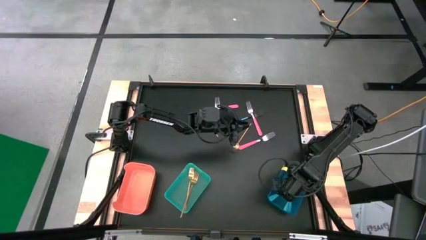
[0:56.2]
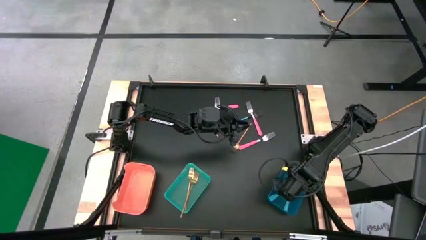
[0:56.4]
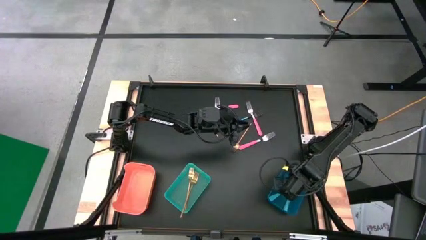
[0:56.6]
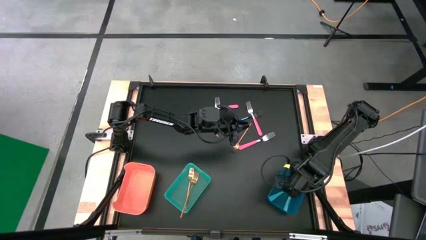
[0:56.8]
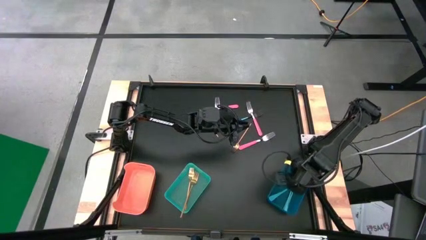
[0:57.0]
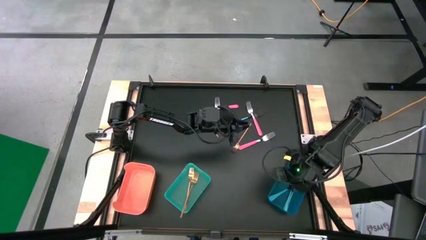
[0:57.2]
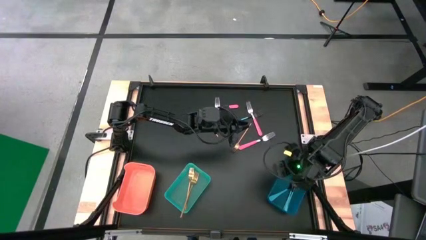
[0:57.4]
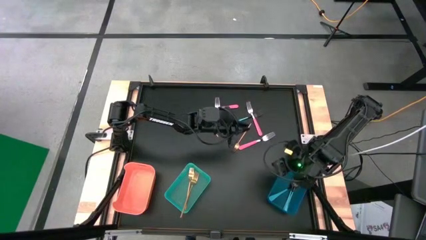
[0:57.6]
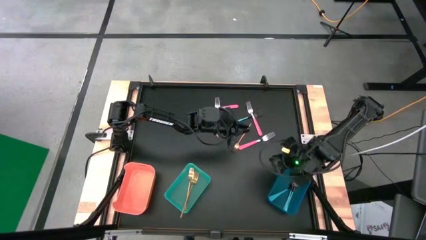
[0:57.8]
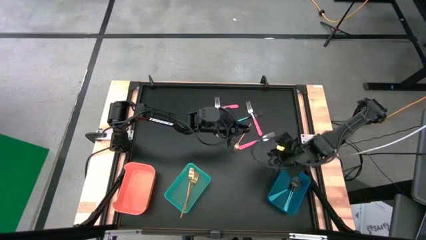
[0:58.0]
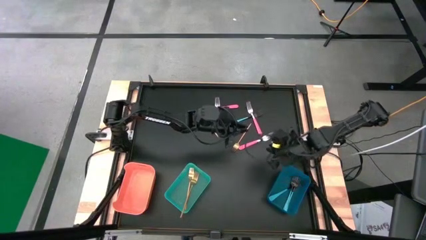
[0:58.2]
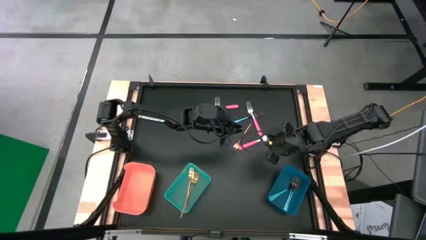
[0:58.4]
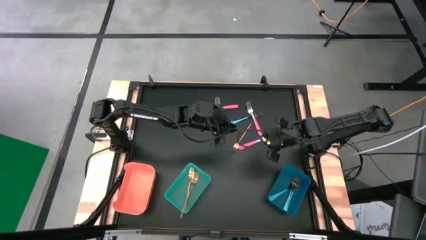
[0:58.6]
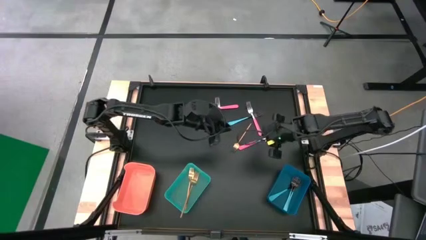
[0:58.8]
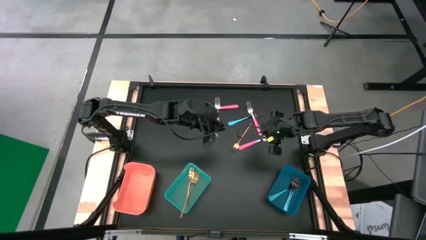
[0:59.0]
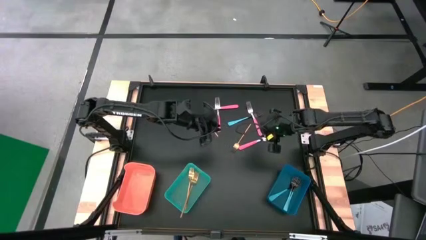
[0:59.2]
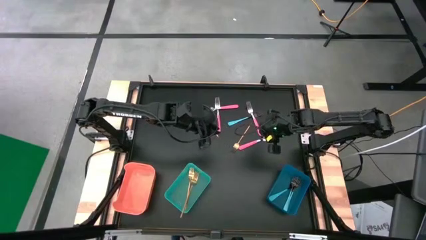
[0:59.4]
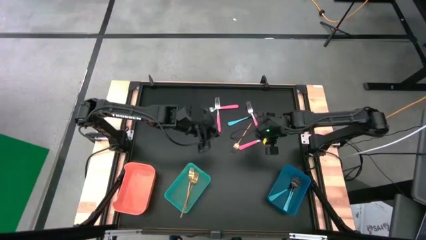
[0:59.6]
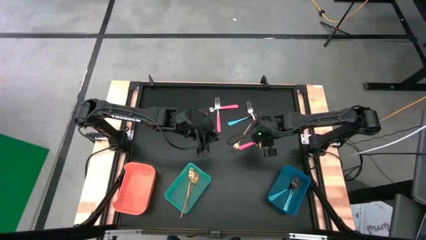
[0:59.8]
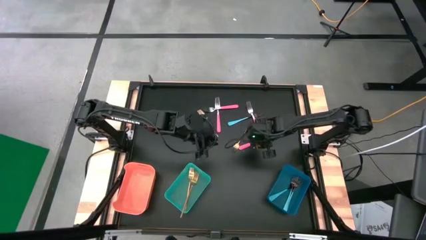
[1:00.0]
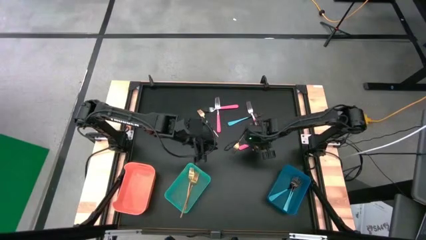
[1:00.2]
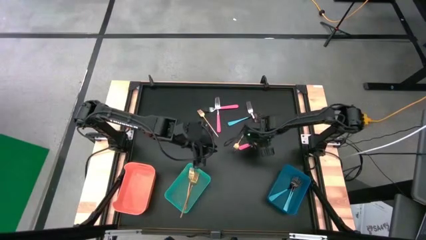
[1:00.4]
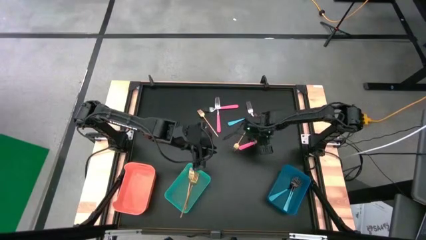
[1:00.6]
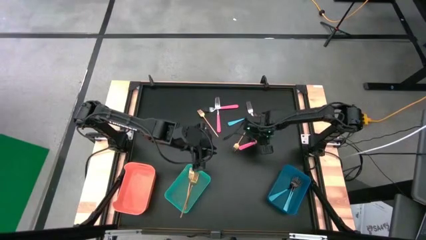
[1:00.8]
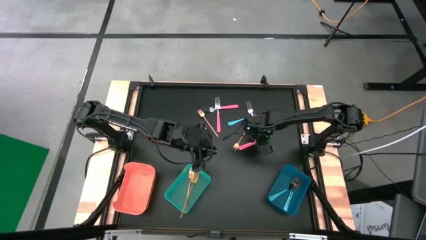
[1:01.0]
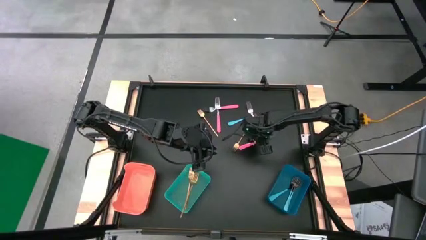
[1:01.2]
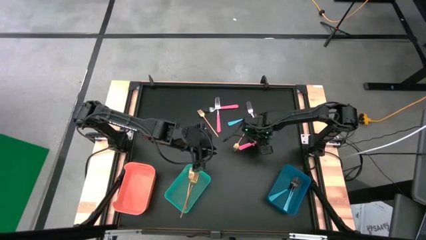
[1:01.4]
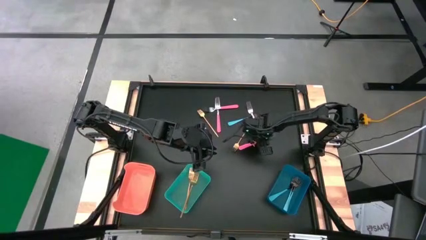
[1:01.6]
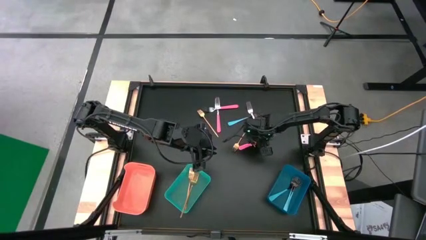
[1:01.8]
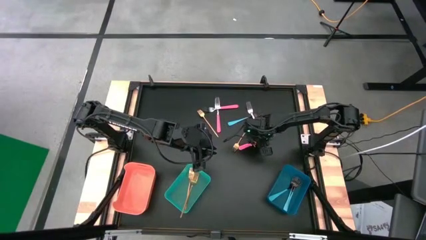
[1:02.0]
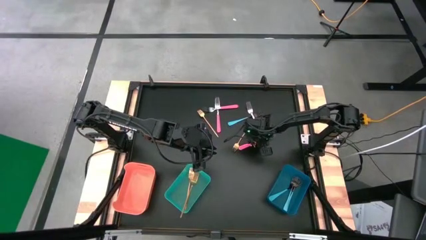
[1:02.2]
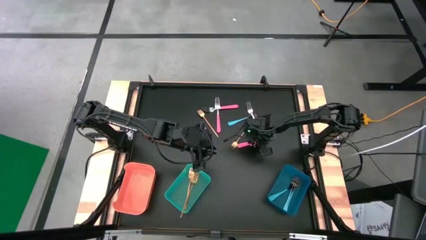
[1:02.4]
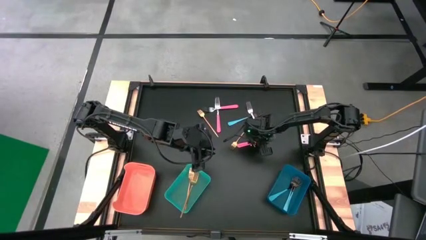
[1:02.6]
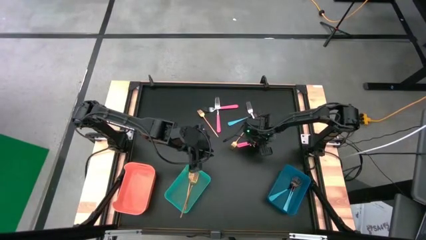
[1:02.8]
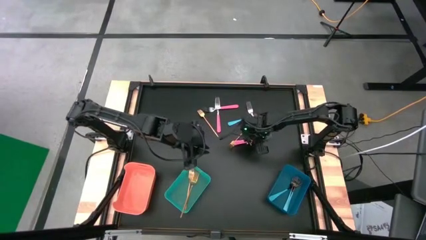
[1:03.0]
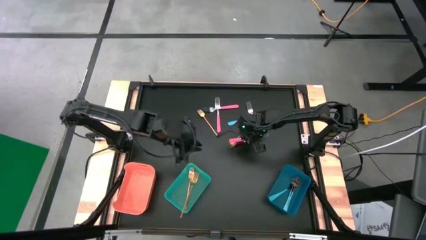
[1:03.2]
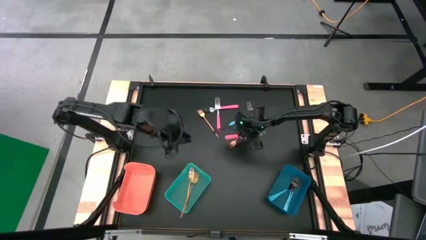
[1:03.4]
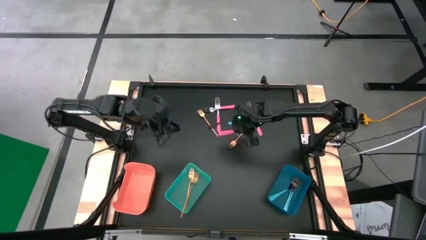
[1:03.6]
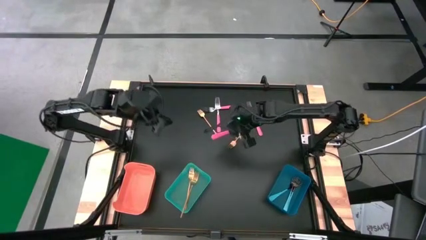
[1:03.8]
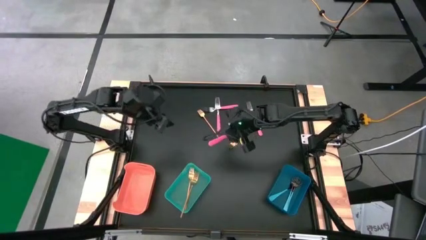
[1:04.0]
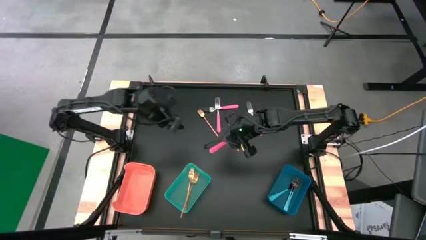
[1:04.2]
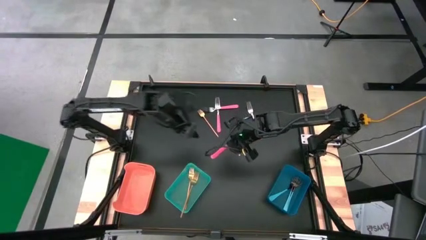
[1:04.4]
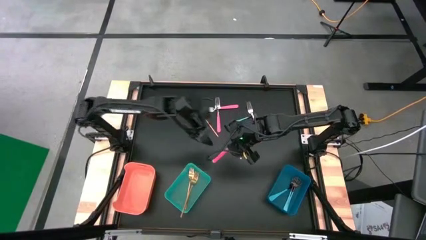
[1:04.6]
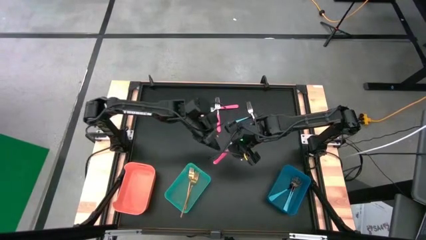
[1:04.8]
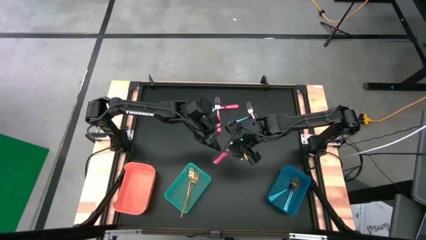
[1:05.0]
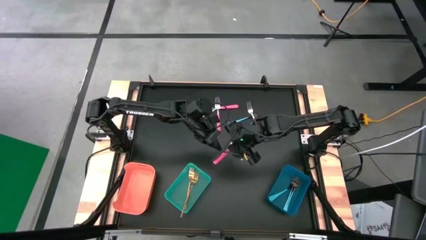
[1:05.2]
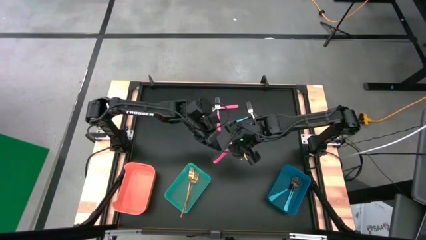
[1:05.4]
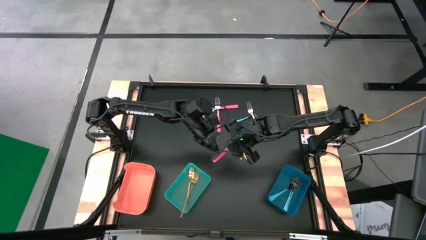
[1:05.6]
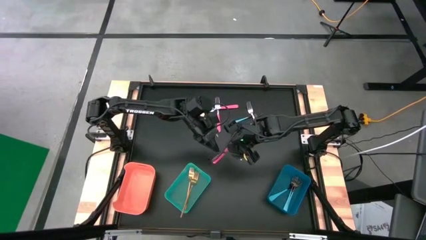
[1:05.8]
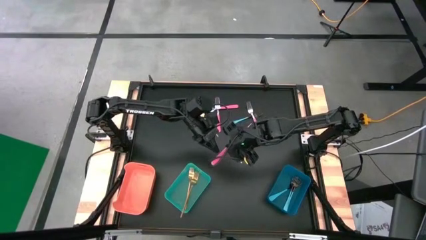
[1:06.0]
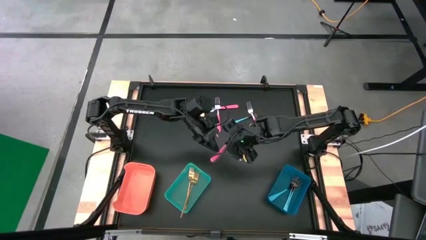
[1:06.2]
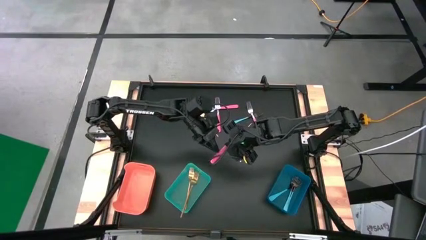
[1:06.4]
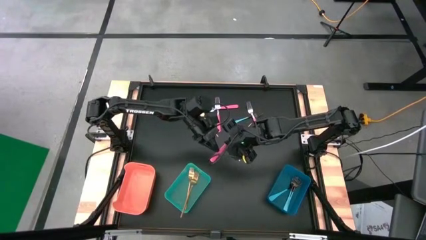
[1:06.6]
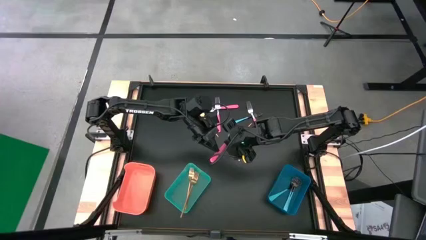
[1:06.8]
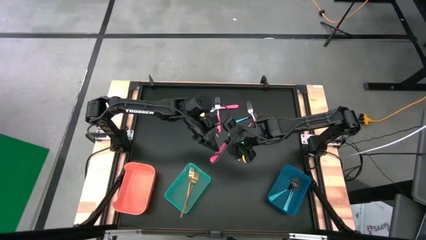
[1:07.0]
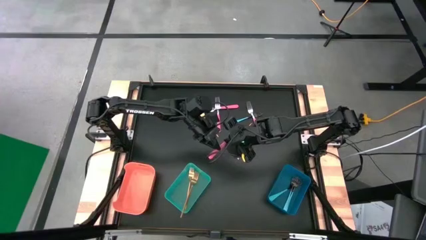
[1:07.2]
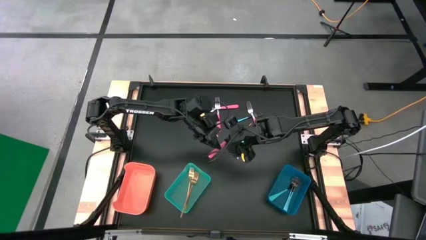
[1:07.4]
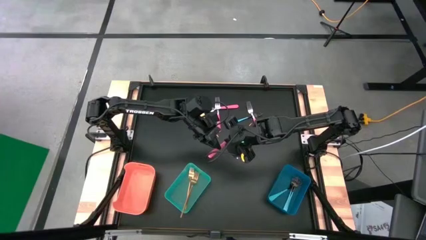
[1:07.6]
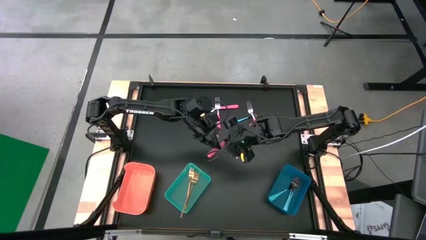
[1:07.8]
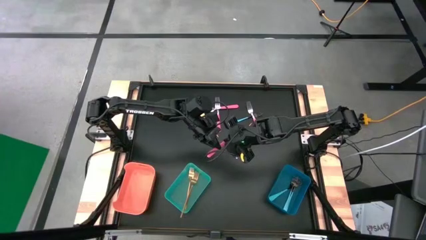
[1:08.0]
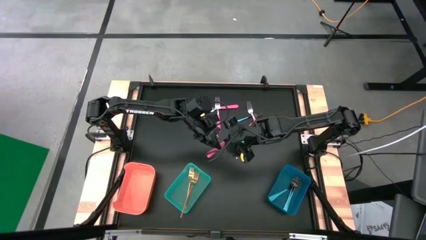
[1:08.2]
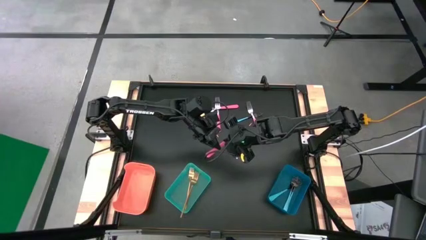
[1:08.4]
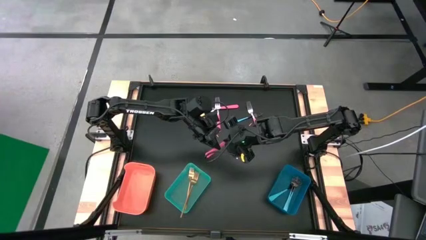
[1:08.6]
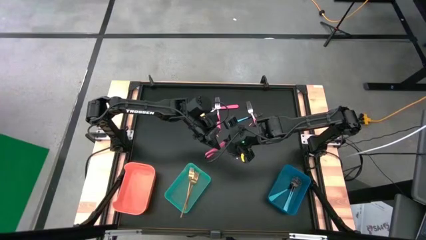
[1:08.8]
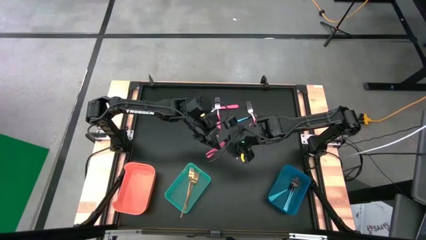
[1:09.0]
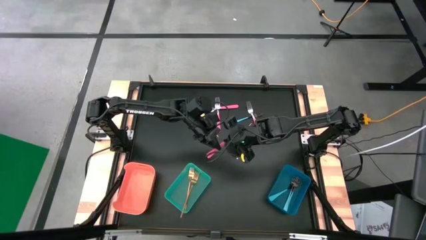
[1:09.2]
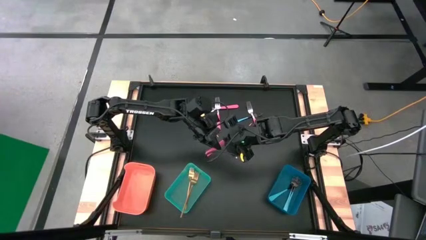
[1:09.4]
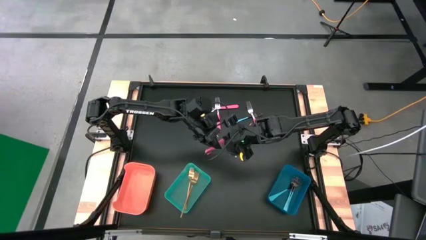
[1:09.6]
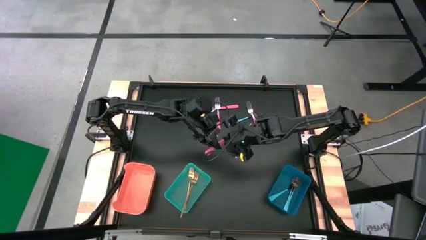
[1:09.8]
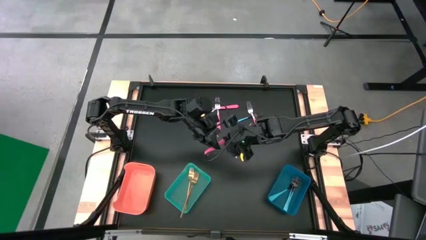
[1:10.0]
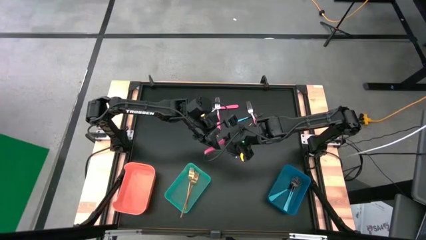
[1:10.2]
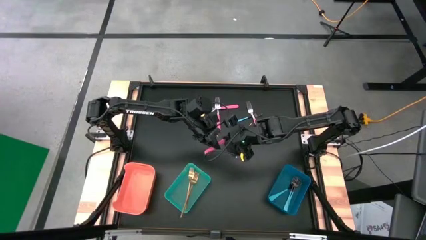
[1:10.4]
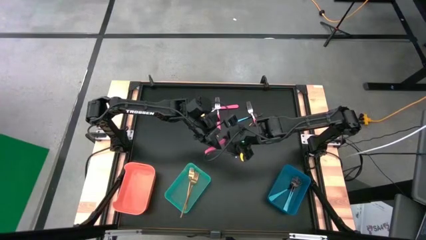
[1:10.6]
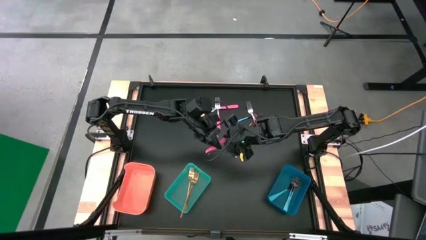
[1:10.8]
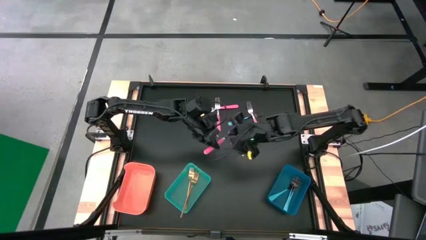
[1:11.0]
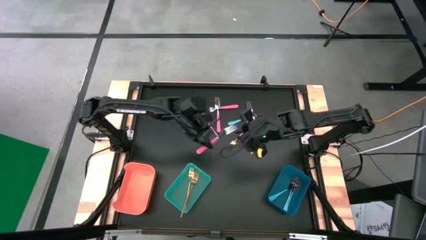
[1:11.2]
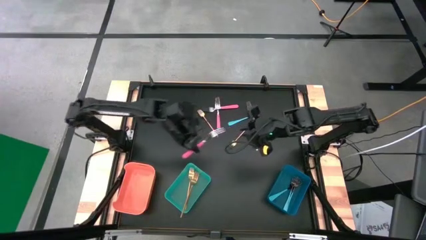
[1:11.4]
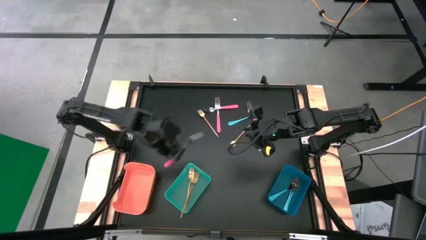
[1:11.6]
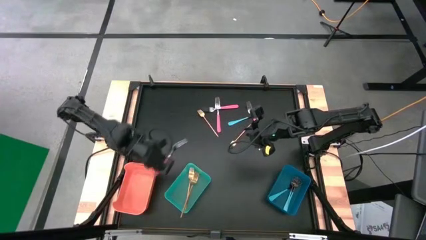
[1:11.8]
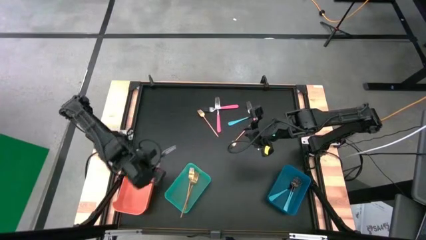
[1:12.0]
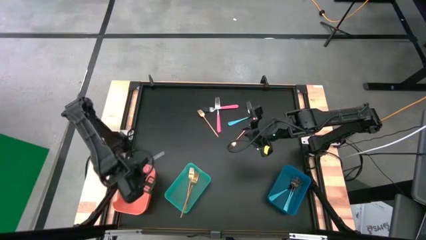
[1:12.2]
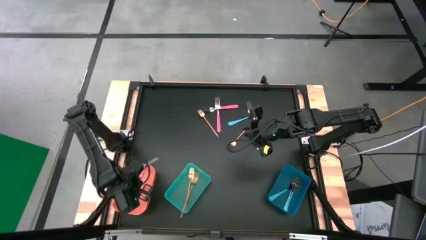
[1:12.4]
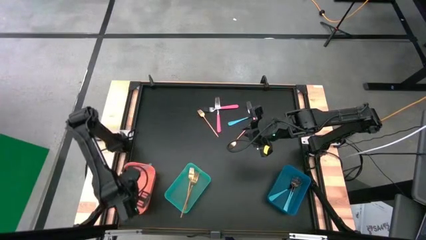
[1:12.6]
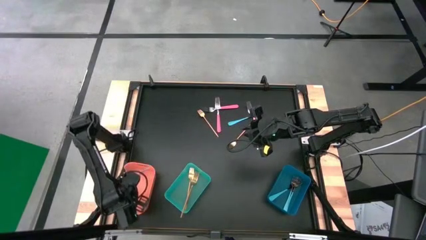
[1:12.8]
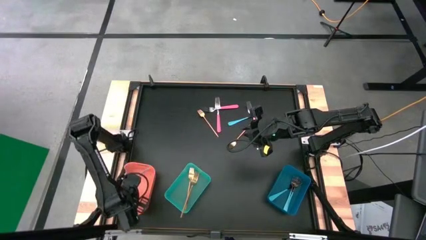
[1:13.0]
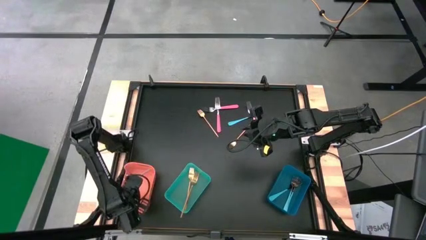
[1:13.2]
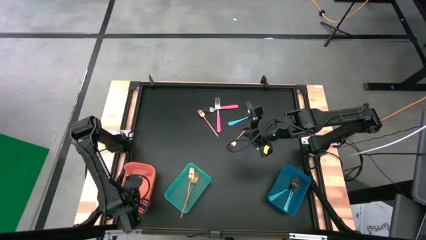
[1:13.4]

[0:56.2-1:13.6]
Task: Sort silverware by color (type)
Put the pink fork into the orange bin
